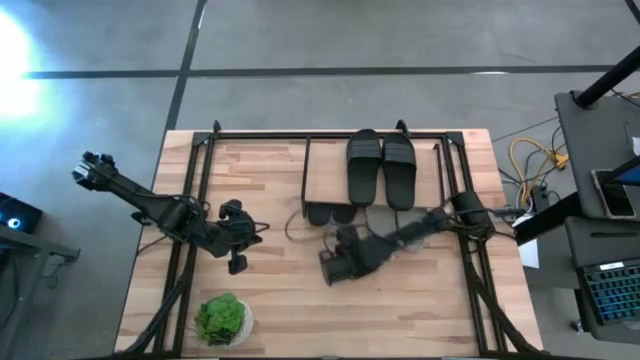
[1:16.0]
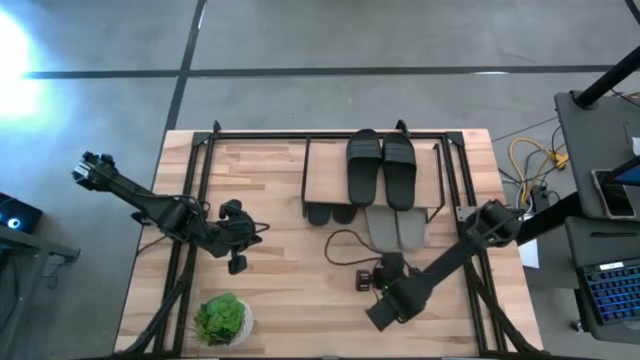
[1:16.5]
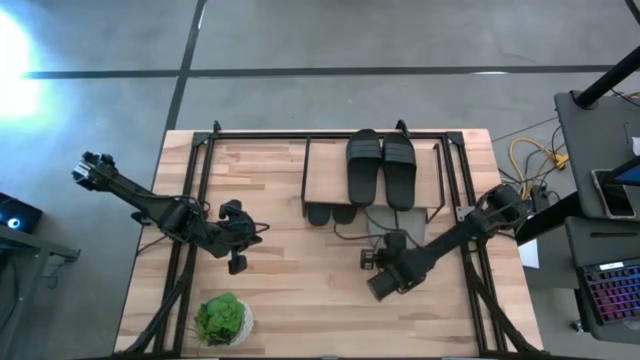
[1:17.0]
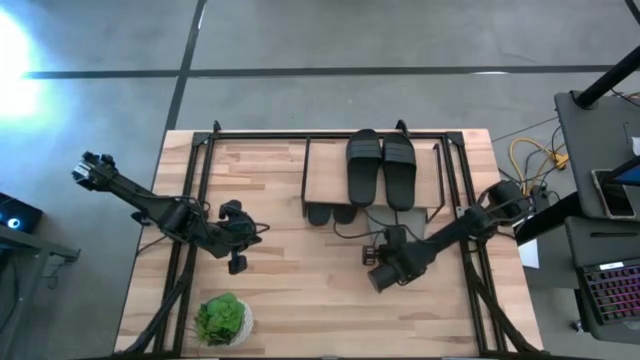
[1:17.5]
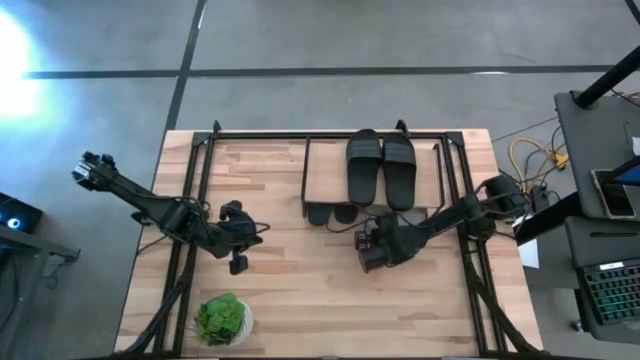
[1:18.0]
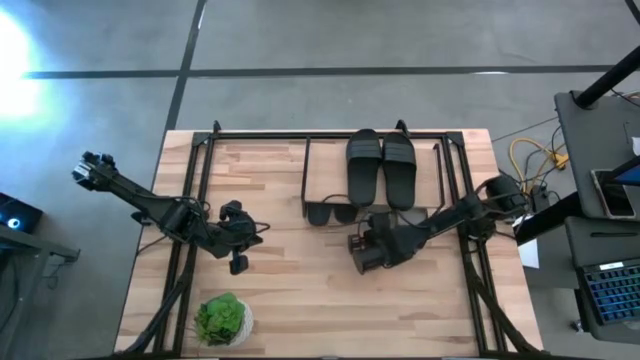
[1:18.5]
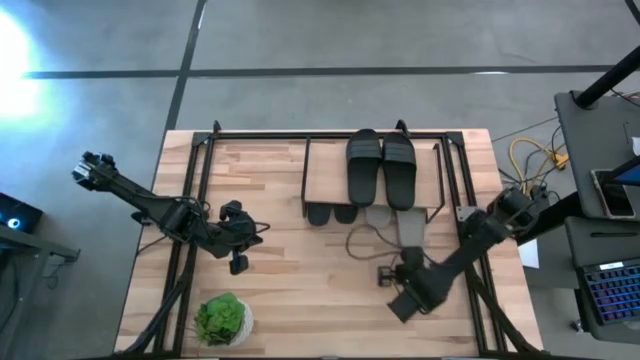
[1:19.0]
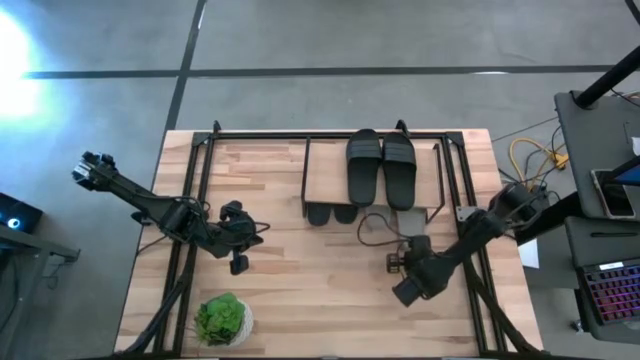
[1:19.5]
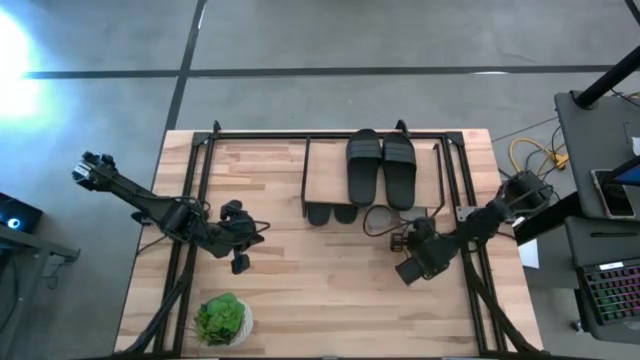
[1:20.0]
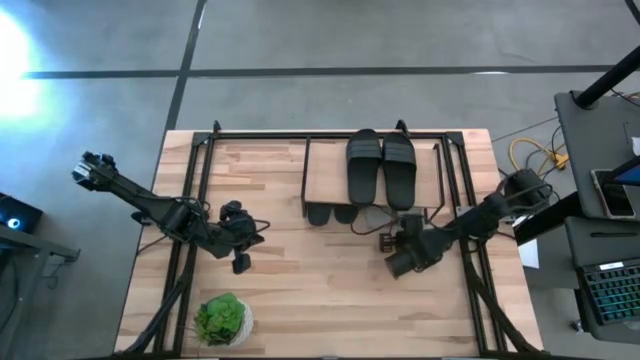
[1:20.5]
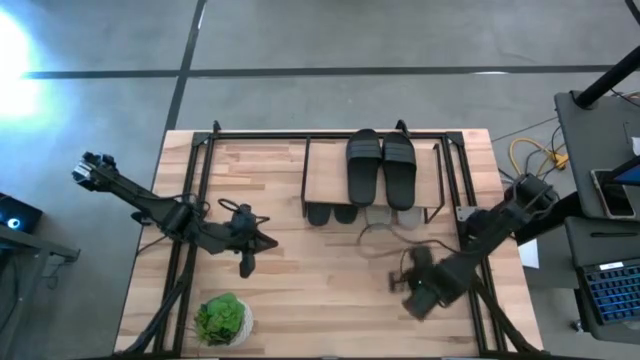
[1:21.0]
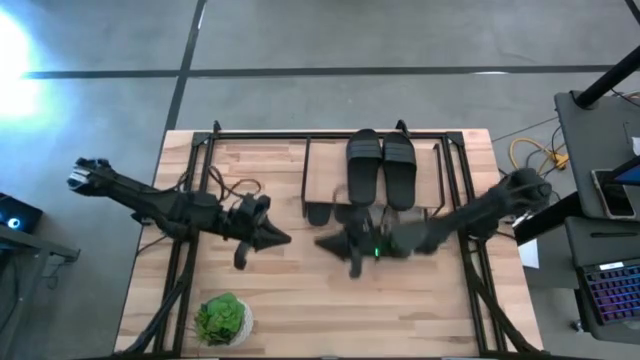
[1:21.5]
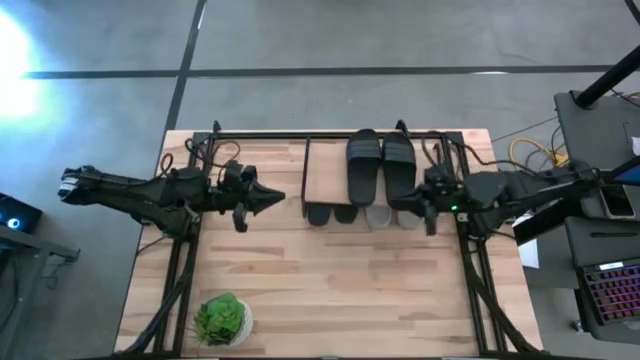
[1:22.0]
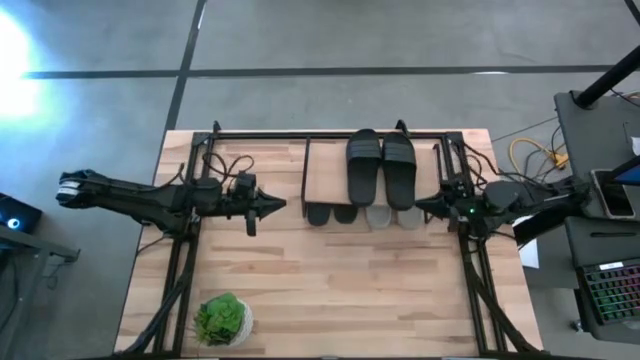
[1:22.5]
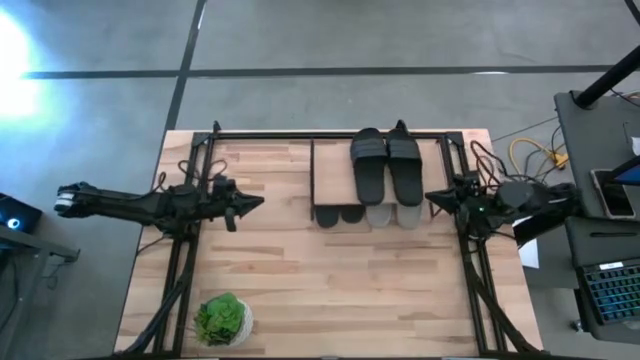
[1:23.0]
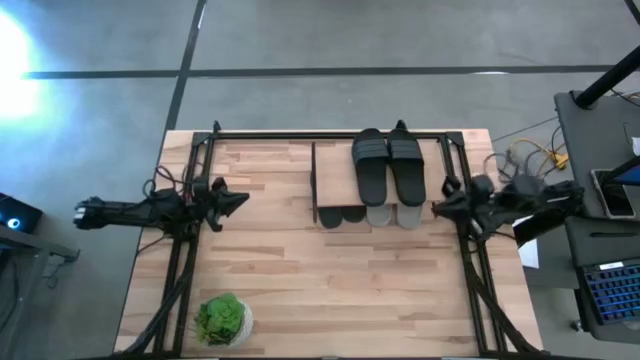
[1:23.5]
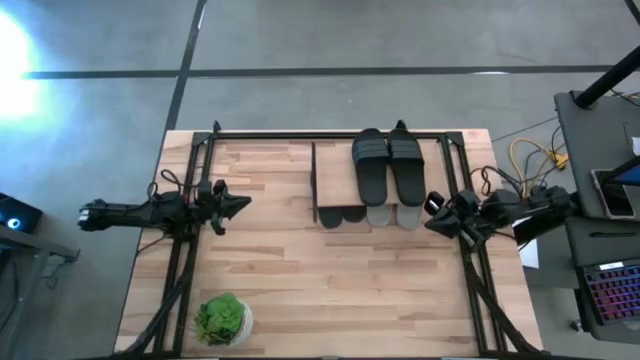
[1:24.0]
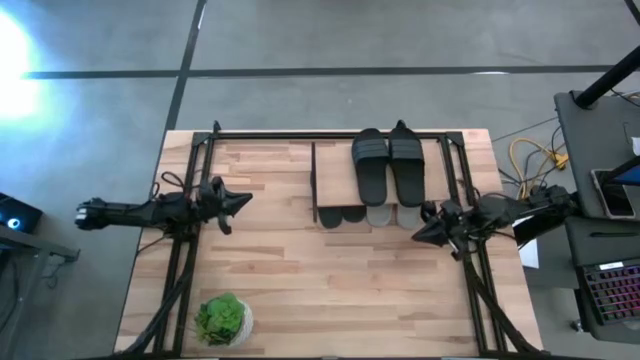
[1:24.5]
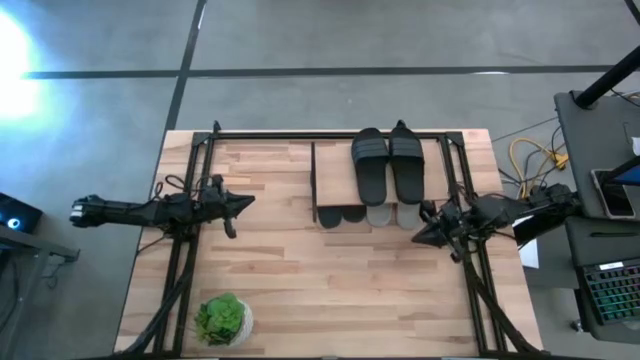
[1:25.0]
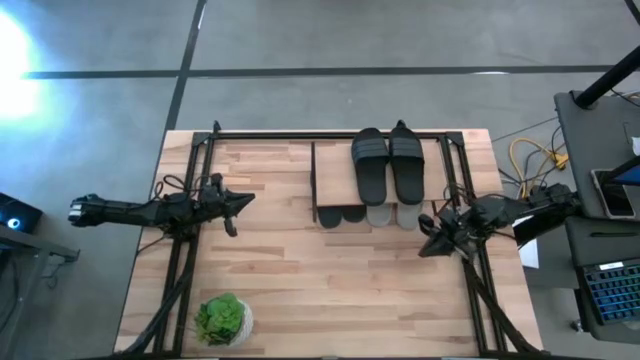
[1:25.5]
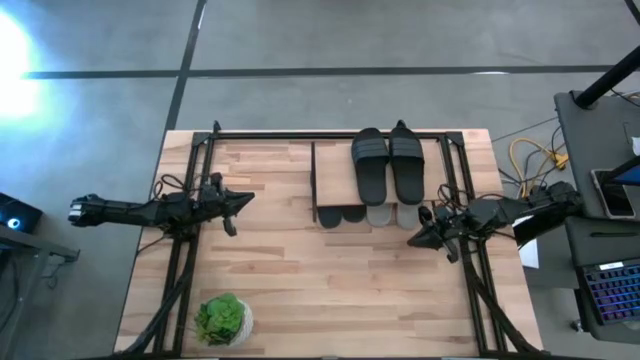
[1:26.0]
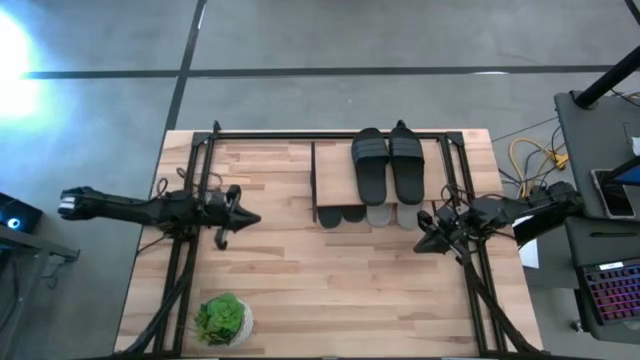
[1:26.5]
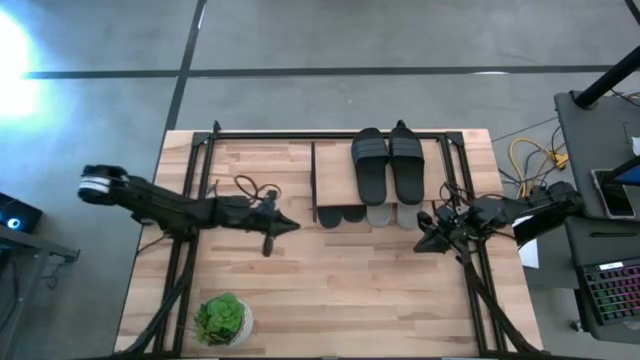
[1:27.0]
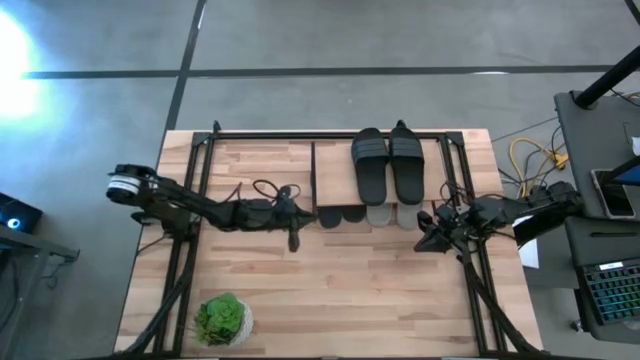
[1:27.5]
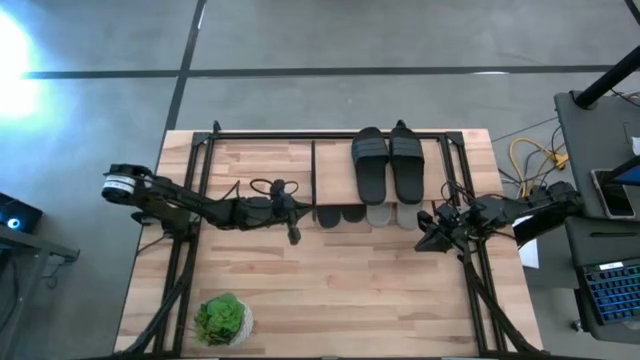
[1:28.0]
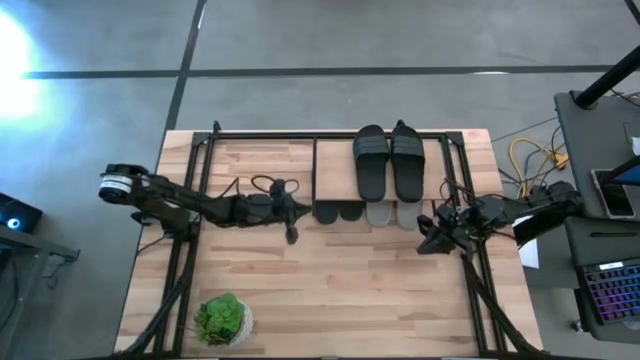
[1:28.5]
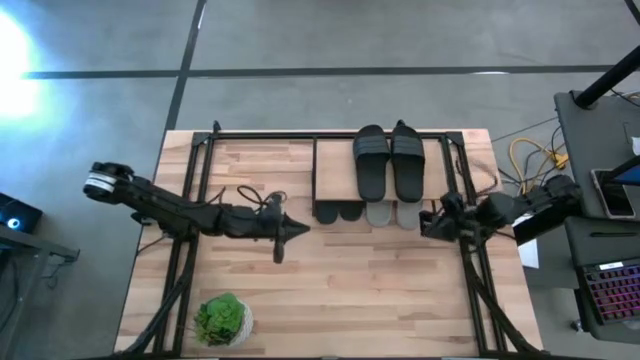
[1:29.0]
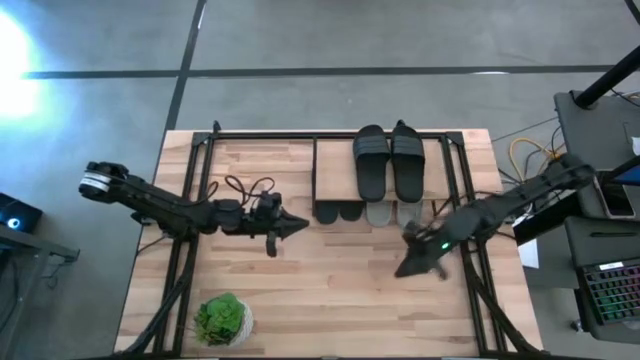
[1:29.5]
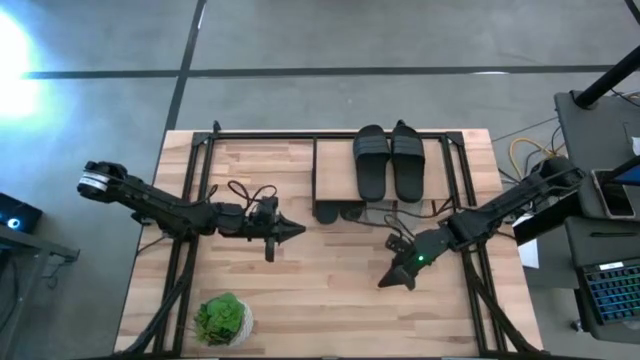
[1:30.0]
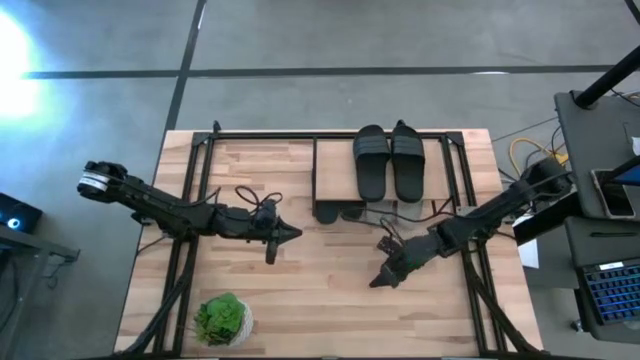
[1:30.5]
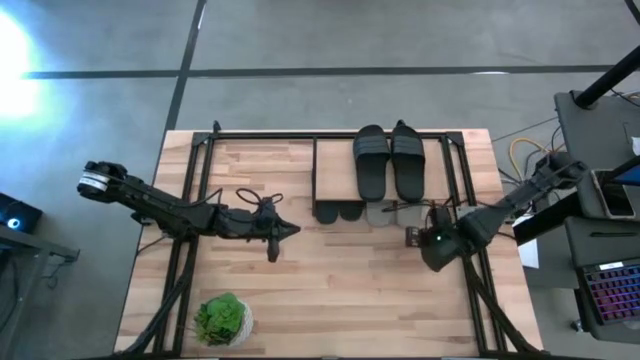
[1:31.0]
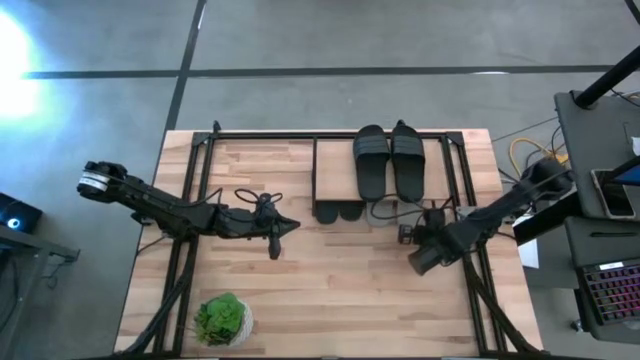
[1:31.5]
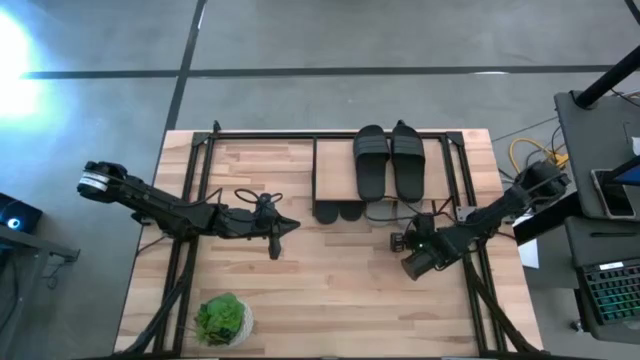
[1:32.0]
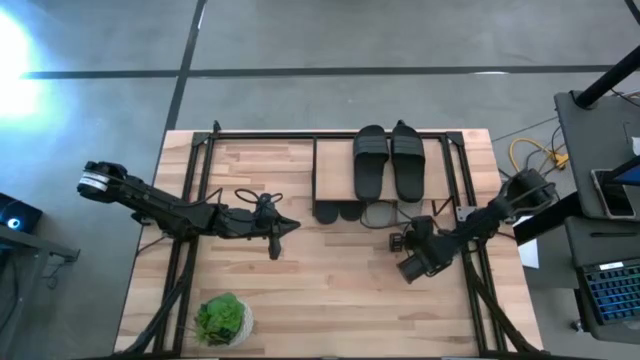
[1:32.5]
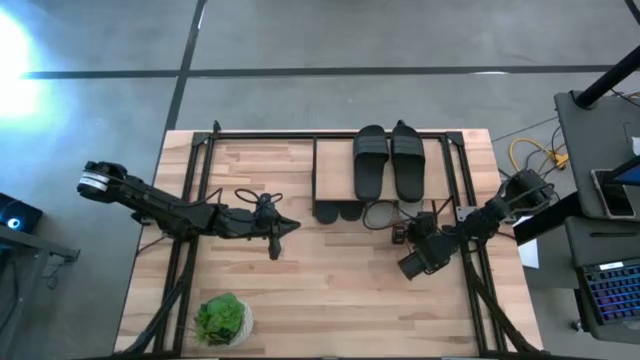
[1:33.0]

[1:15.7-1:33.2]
Task: Pick and place slides into the shelf
Adjust the gray slides under the shelf

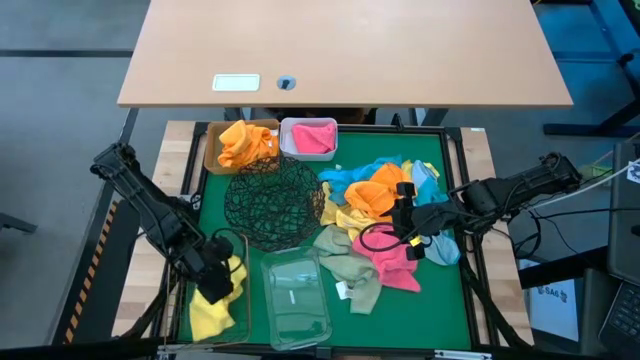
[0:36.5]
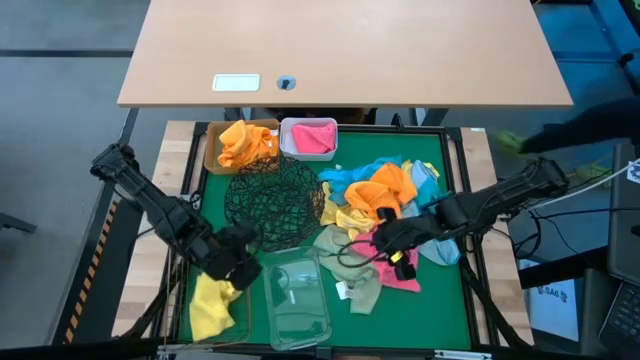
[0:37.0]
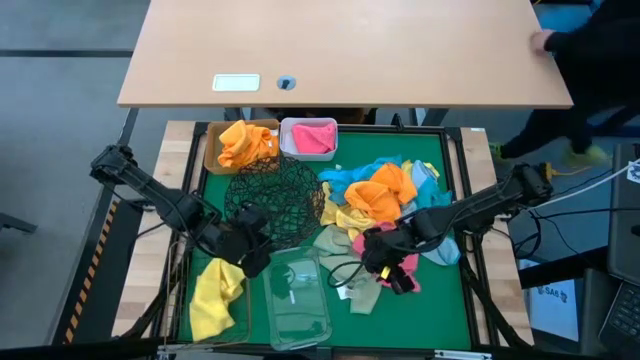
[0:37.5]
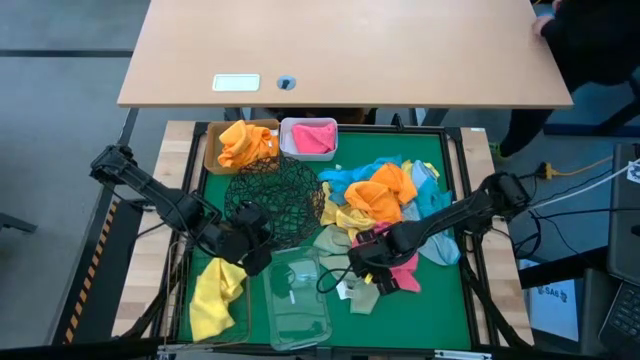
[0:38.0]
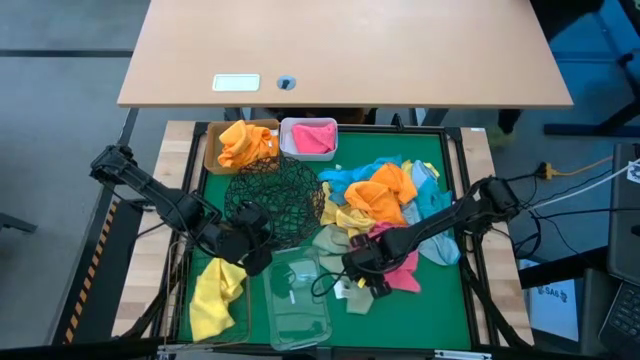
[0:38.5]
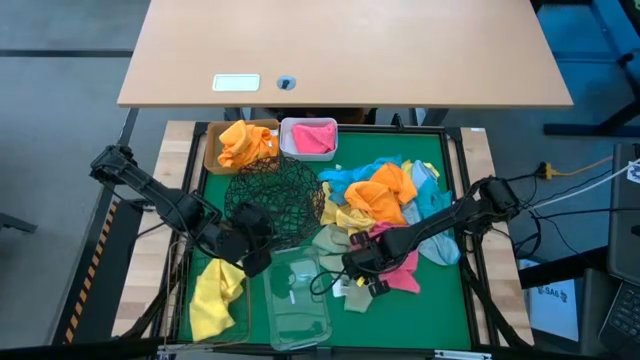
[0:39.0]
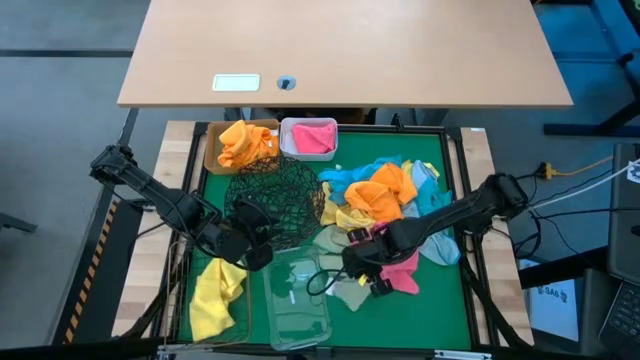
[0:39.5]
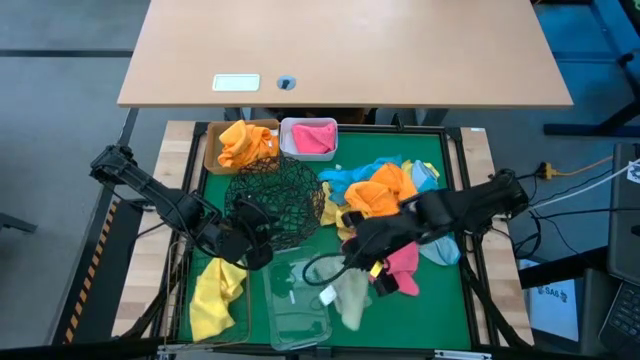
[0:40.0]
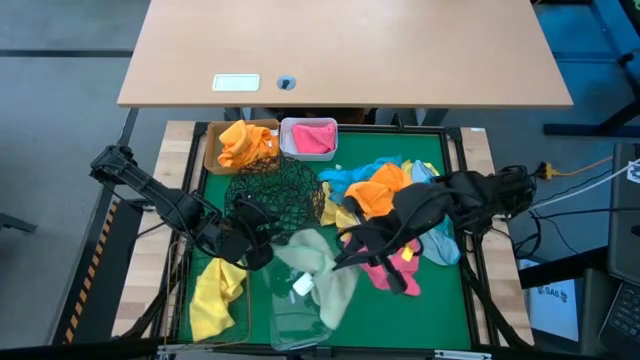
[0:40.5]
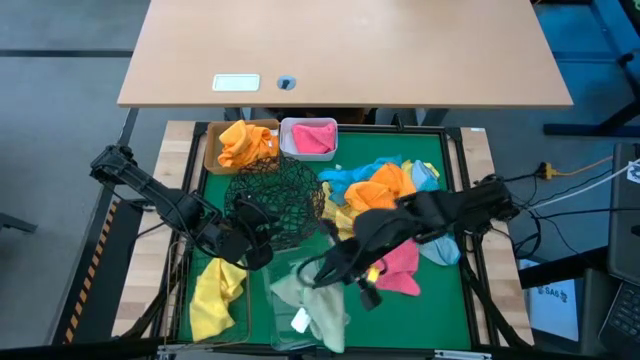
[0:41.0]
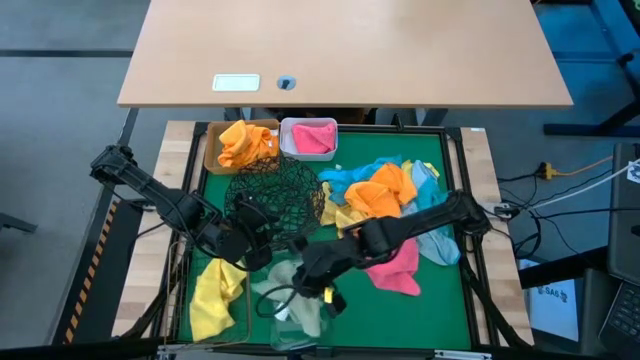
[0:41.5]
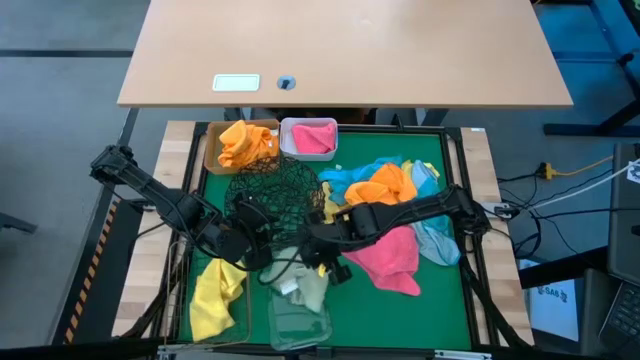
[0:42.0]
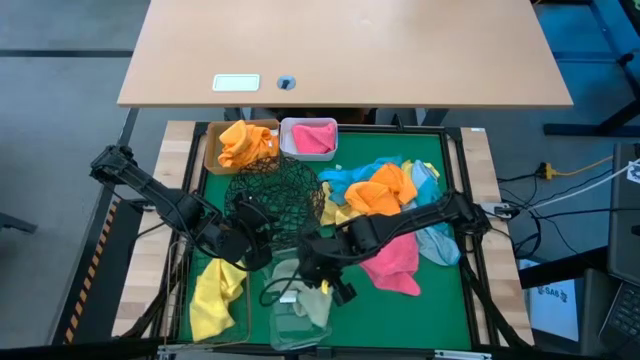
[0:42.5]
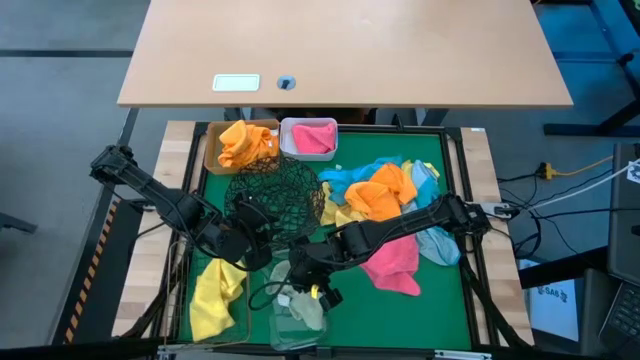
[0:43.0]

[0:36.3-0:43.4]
Task: Sort microfiber towel by color & place in baskets
Put the light green microfiber towel into the transparent bin
